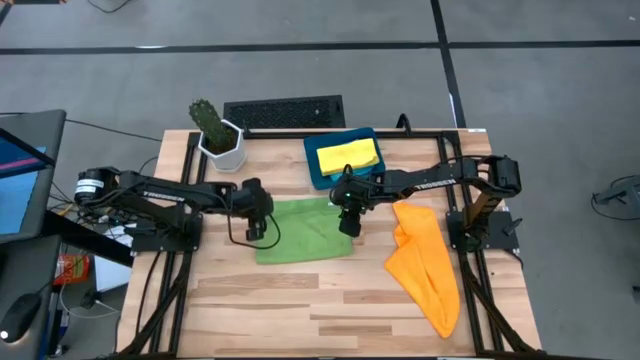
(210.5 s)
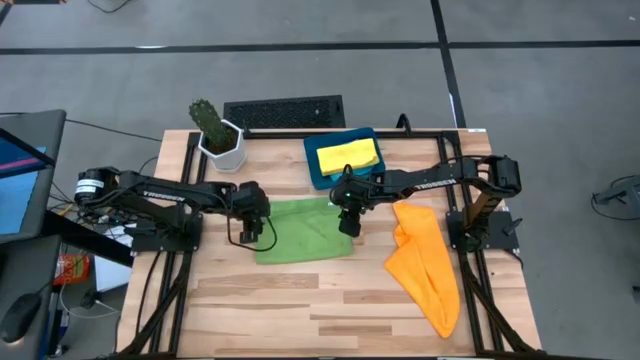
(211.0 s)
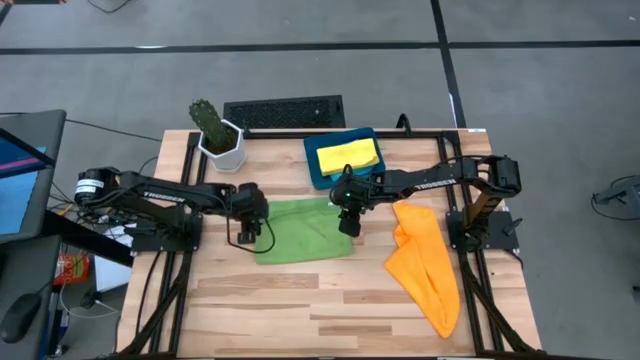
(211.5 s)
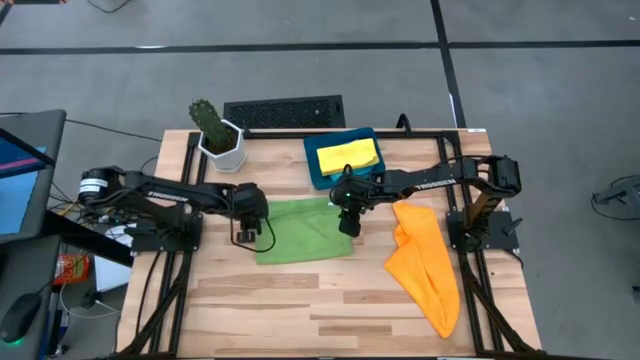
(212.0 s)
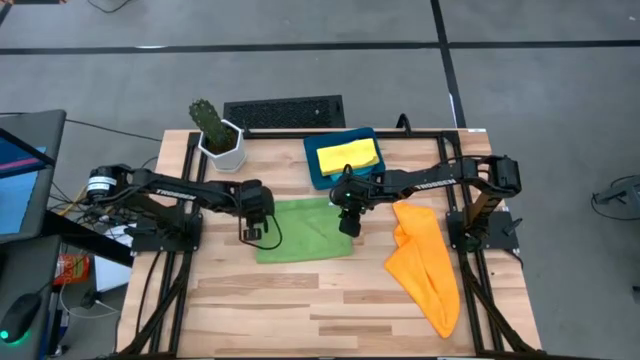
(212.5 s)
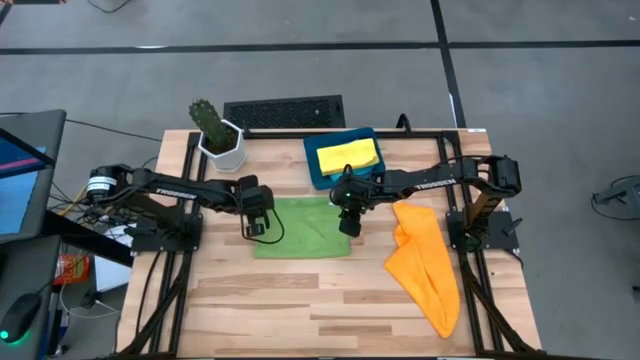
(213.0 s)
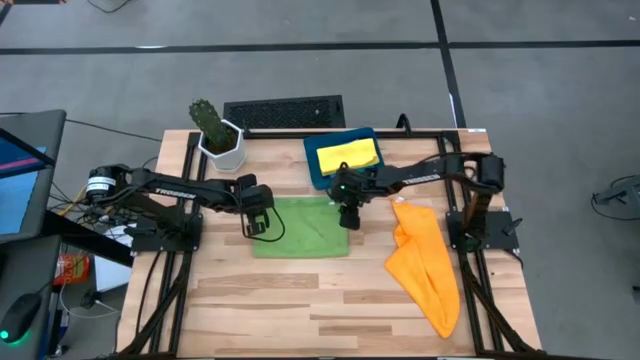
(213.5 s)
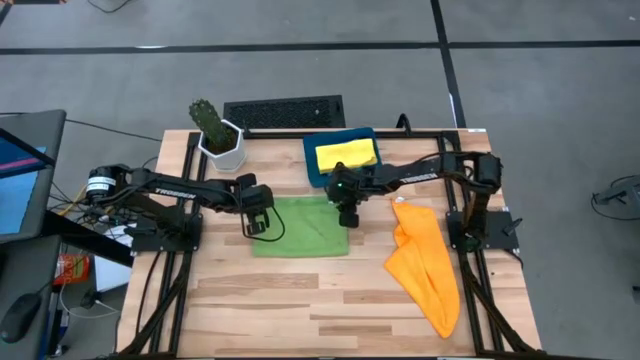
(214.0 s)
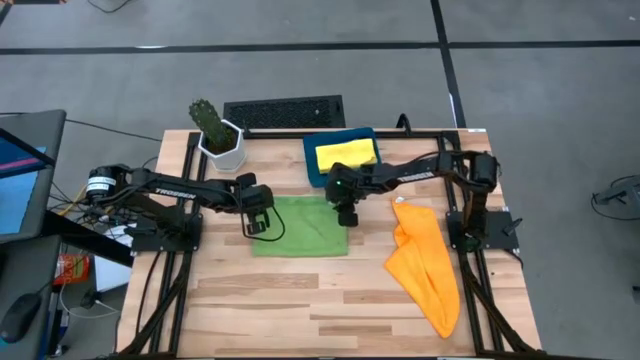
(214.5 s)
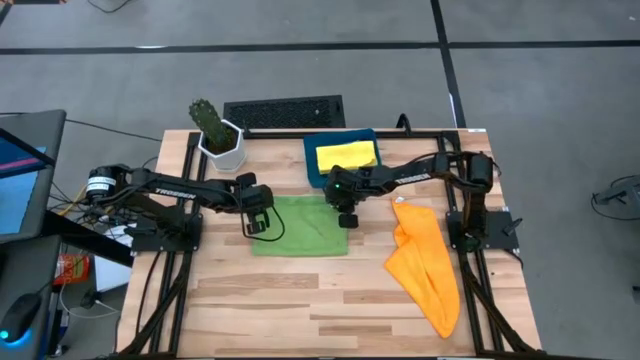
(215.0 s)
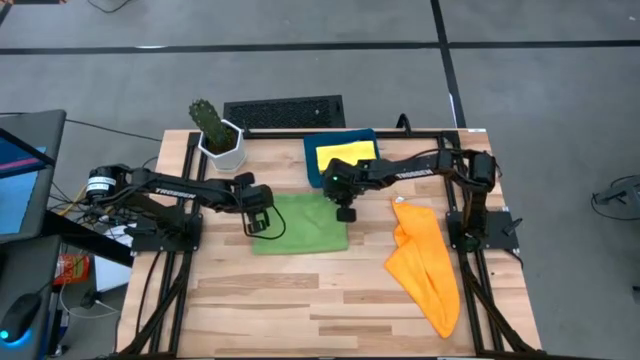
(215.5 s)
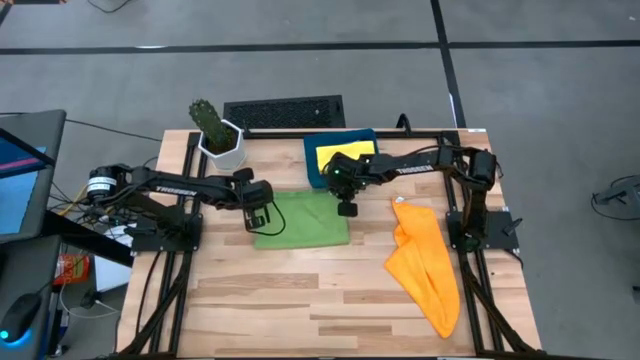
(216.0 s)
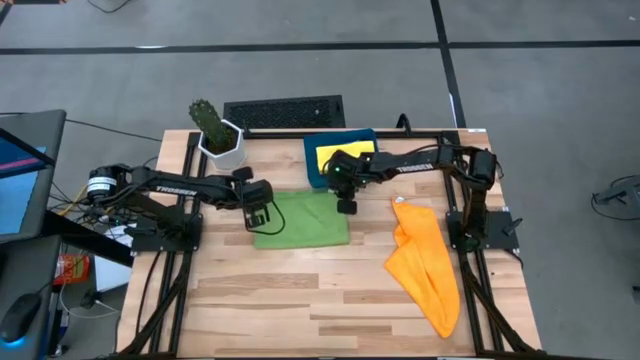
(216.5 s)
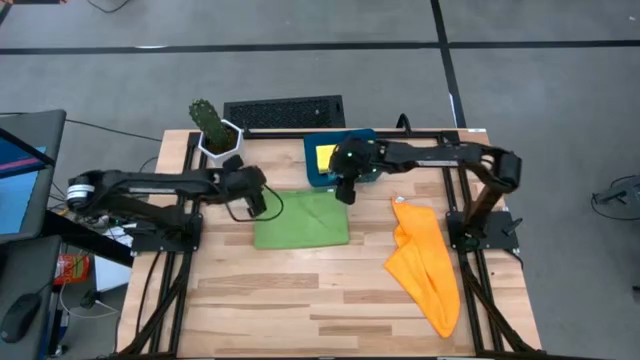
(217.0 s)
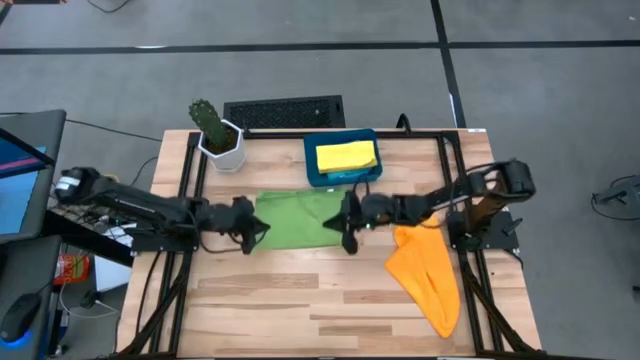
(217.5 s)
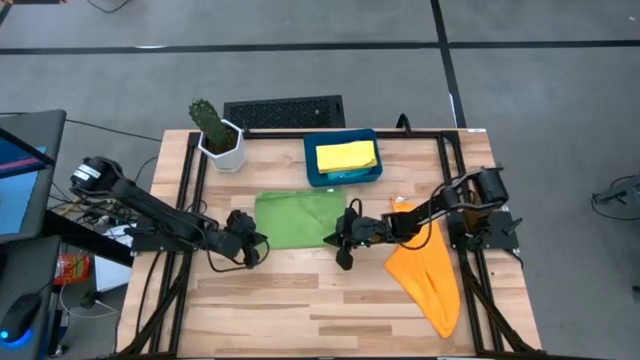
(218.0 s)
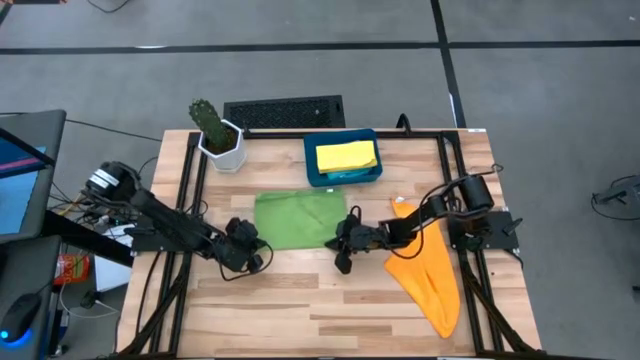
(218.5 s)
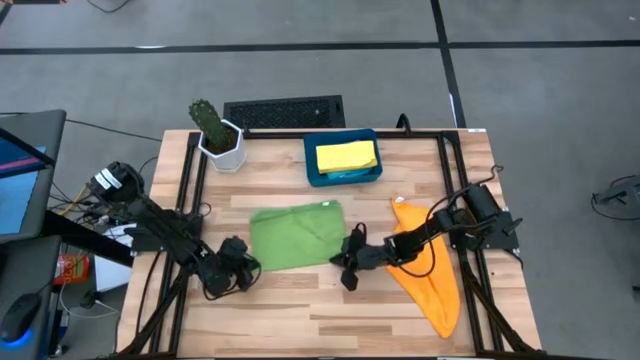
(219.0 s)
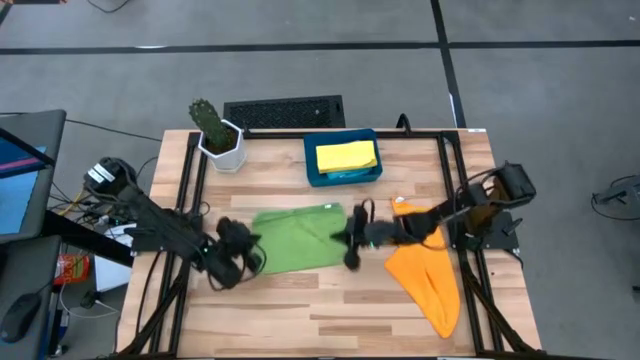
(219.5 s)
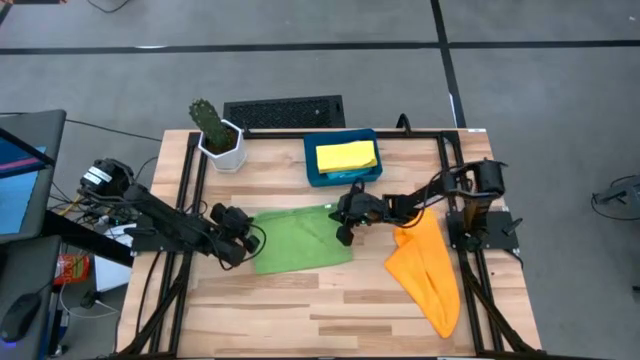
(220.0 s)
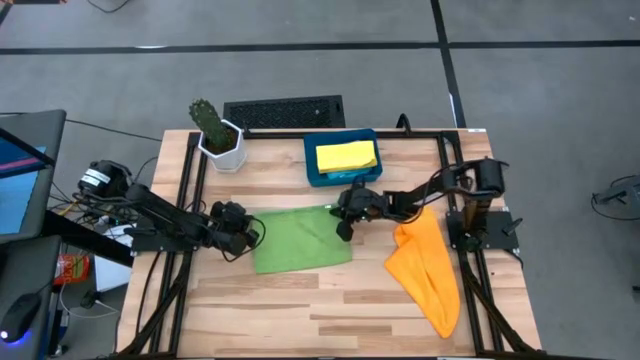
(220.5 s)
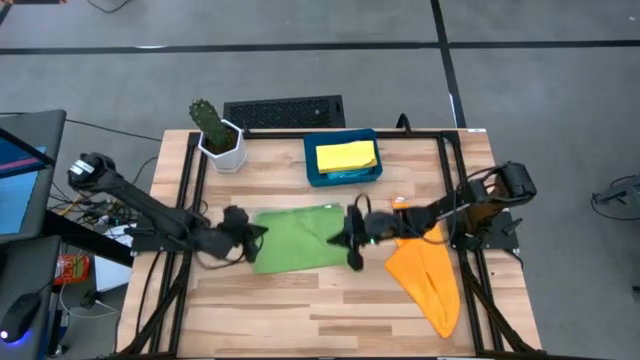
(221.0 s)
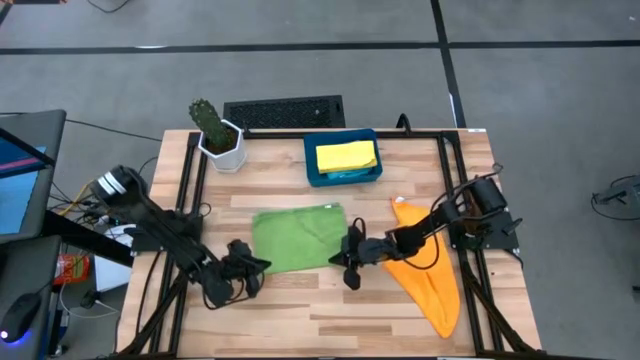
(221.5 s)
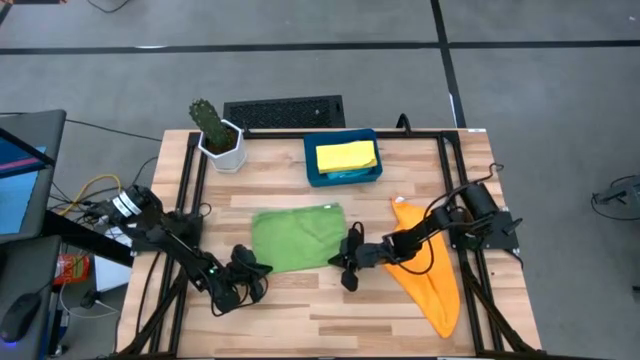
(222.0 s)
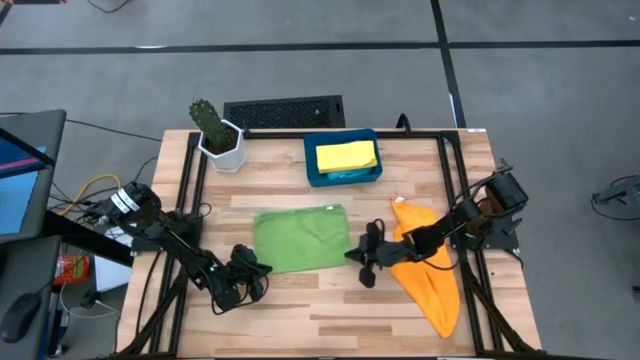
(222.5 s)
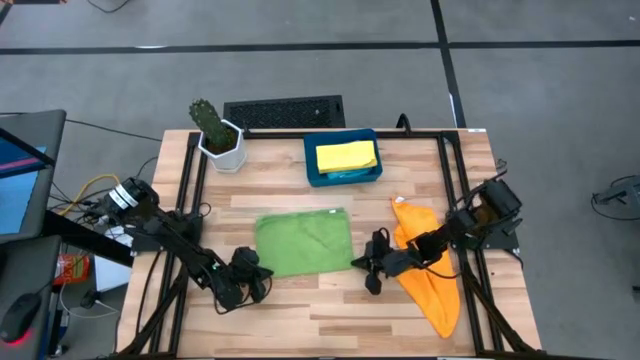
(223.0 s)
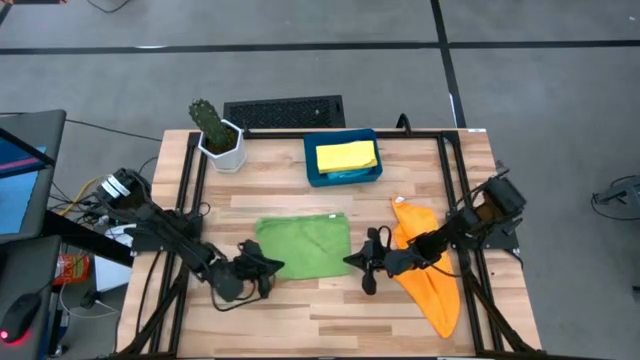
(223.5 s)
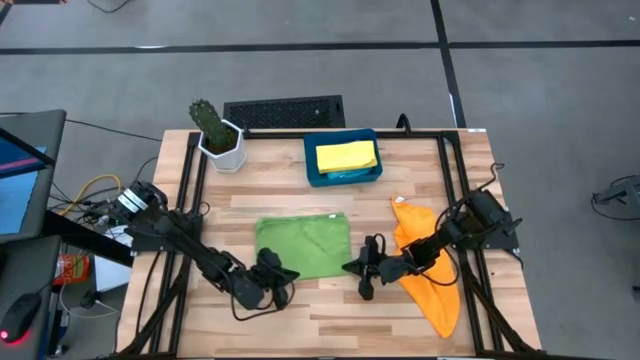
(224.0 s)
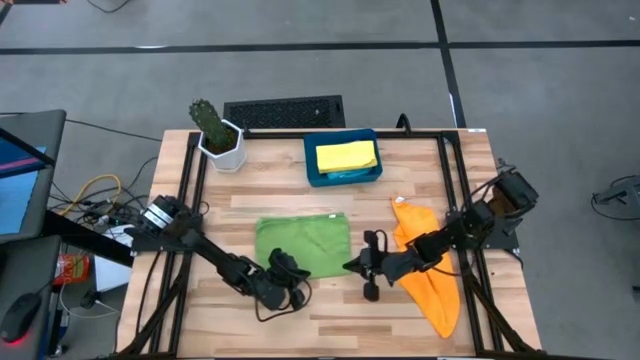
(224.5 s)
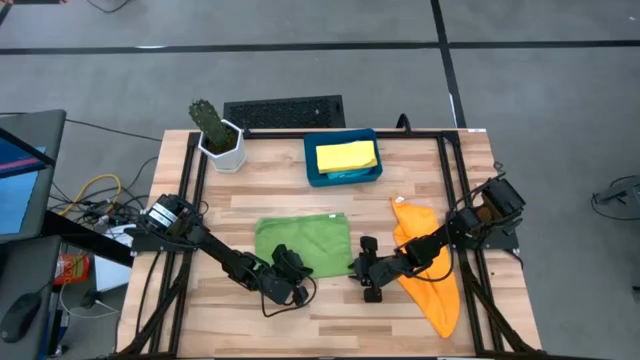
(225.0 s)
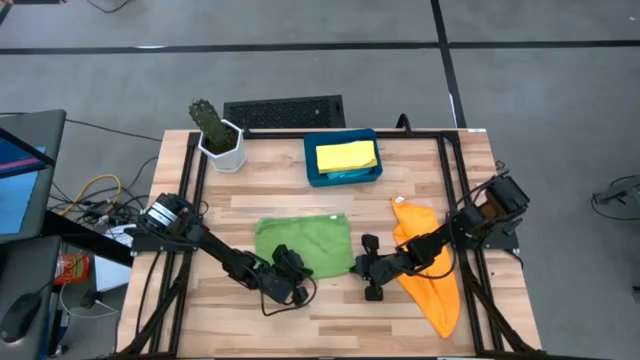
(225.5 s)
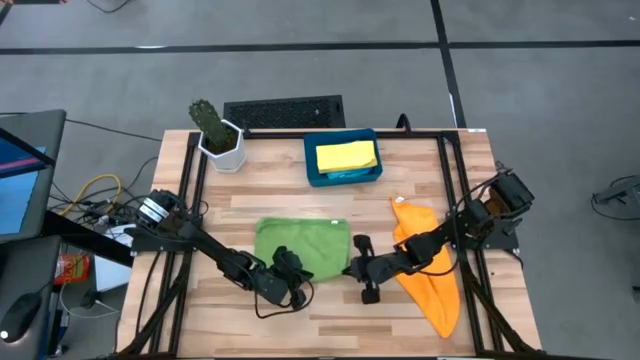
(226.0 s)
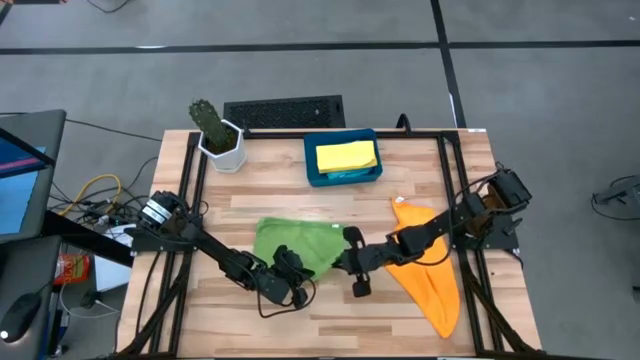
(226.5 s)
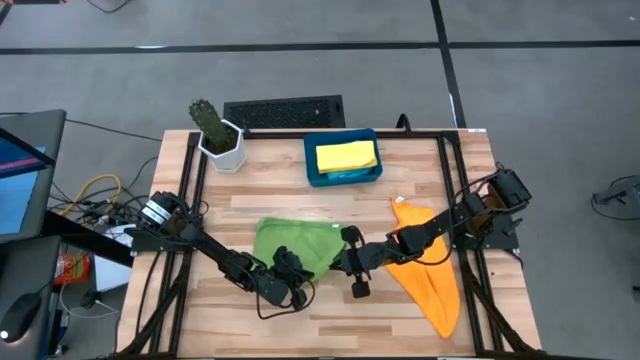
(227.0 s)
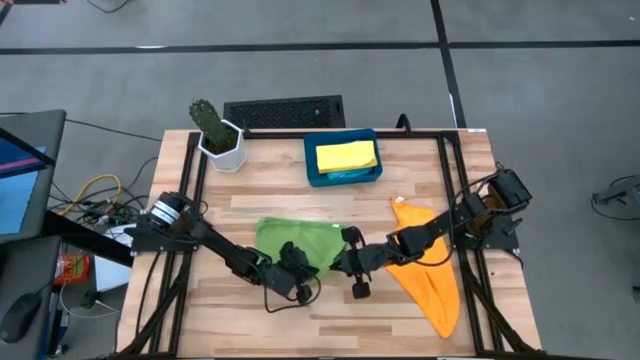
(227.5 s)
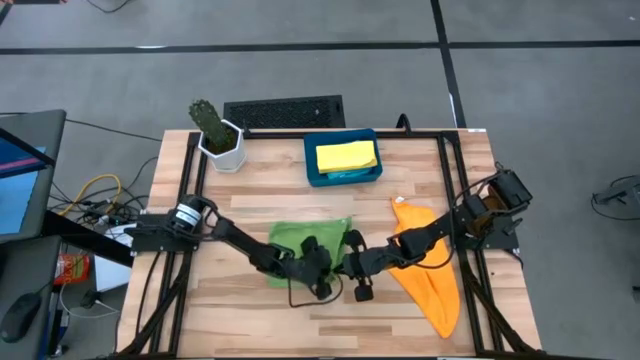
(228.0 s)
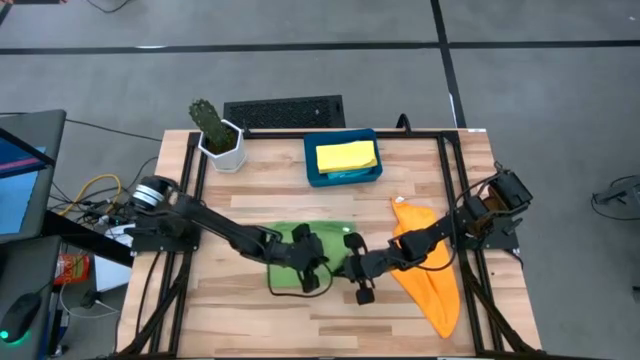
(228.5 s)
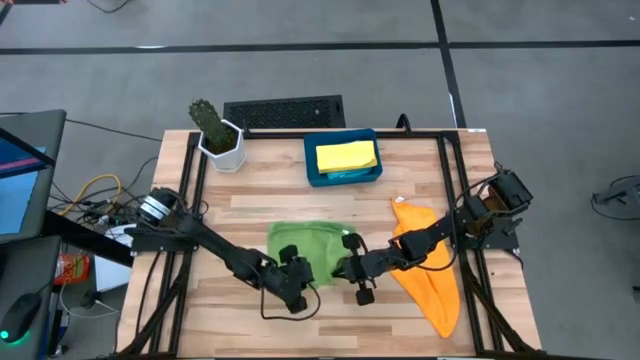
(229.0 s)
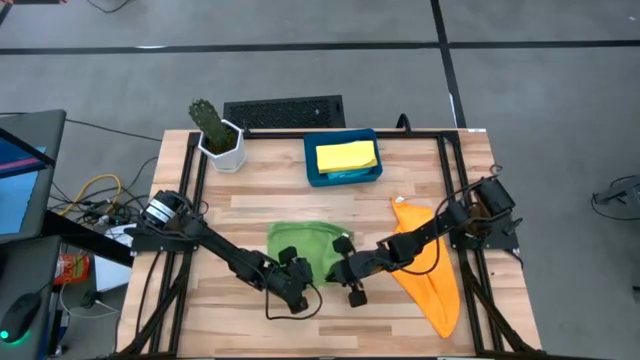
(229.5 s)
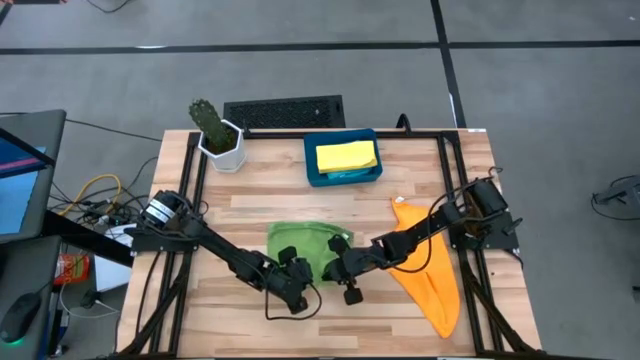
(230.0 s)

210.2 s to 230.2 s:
Task: Fold microfiber towels
Fold the green microfiber cloth
